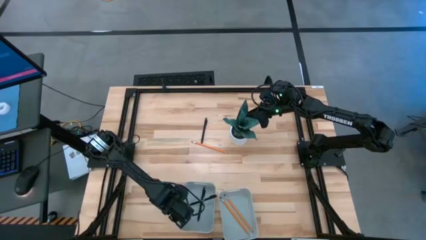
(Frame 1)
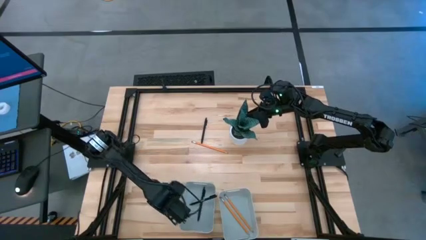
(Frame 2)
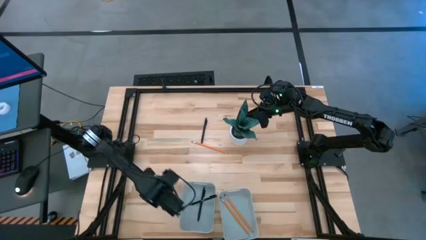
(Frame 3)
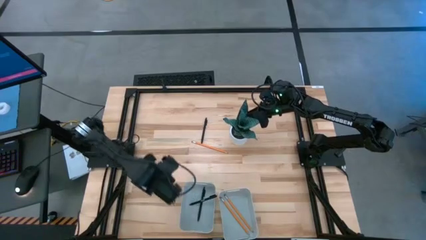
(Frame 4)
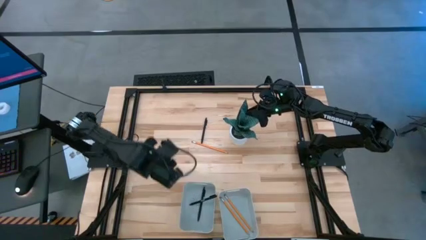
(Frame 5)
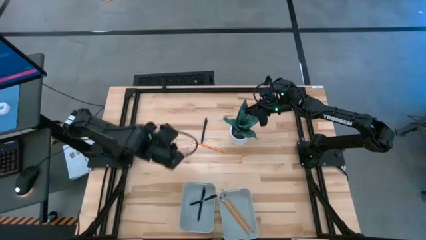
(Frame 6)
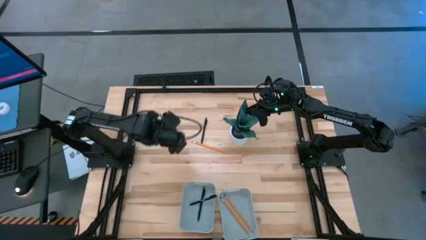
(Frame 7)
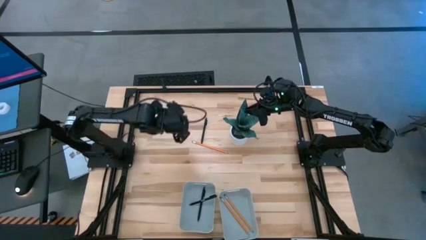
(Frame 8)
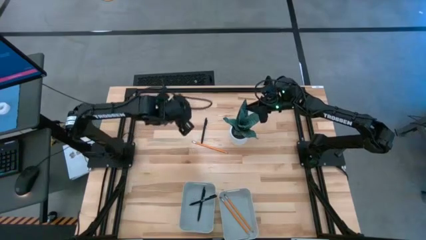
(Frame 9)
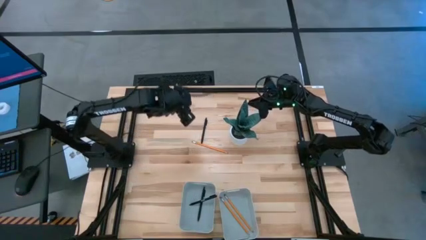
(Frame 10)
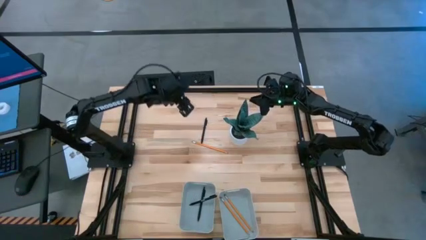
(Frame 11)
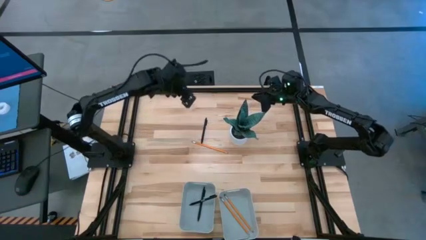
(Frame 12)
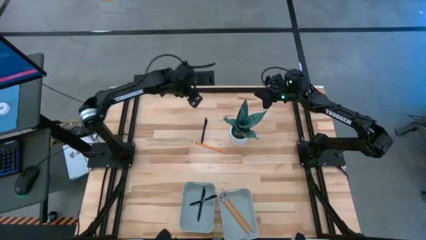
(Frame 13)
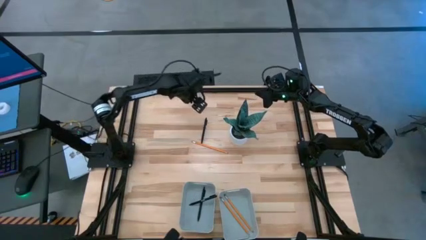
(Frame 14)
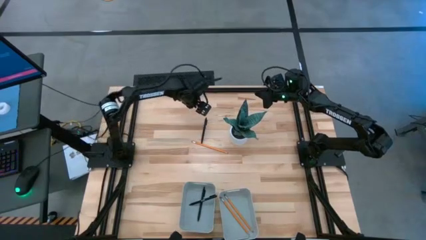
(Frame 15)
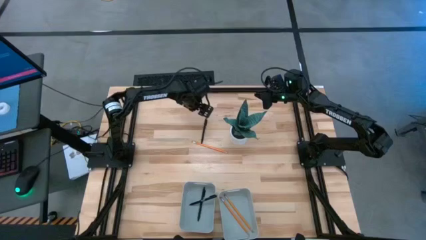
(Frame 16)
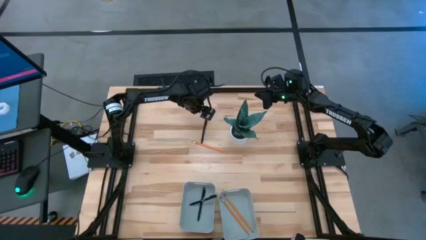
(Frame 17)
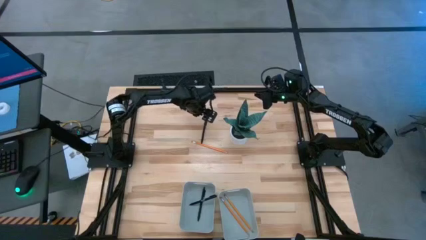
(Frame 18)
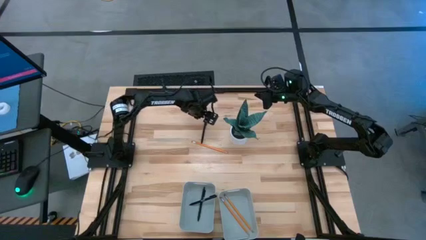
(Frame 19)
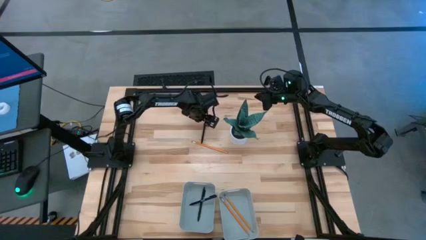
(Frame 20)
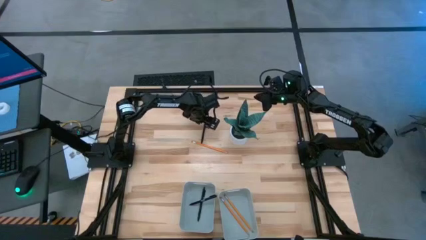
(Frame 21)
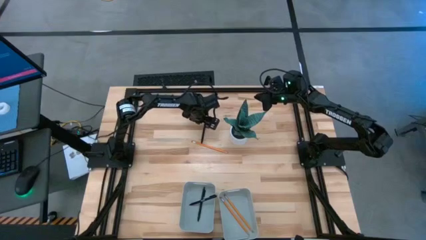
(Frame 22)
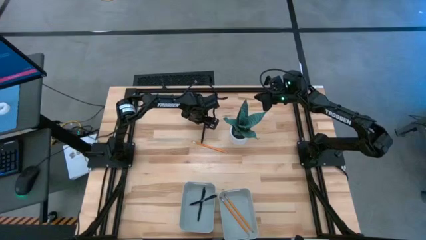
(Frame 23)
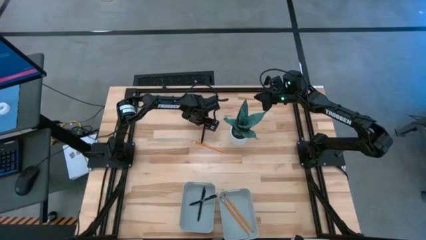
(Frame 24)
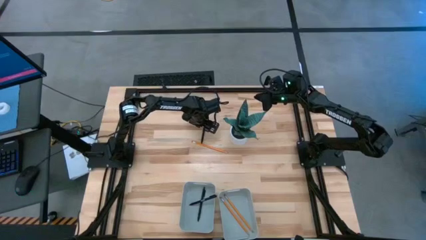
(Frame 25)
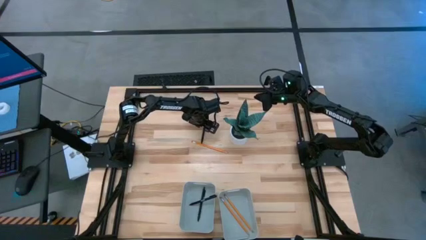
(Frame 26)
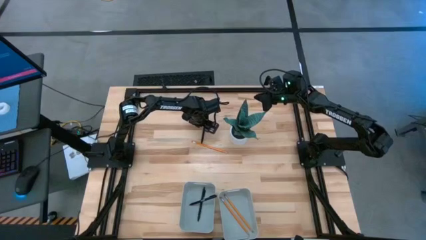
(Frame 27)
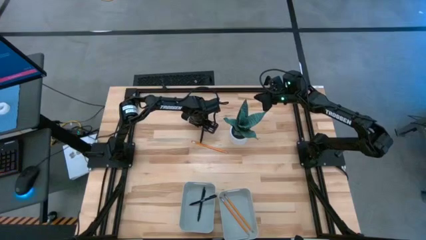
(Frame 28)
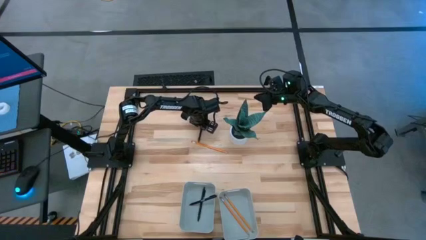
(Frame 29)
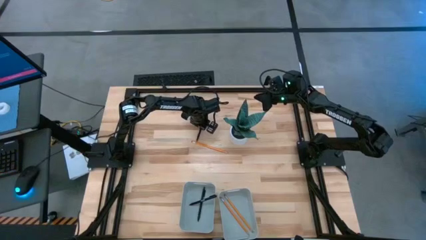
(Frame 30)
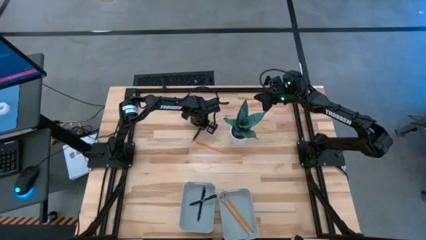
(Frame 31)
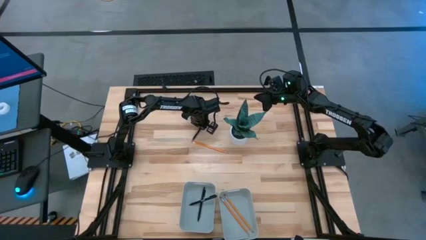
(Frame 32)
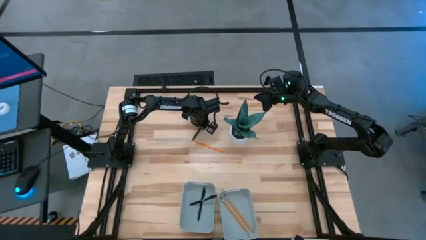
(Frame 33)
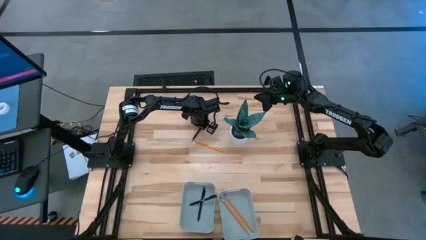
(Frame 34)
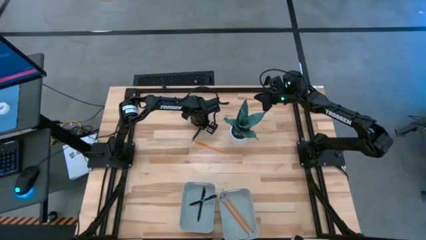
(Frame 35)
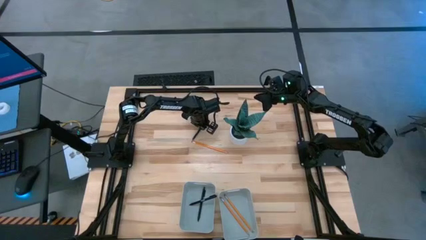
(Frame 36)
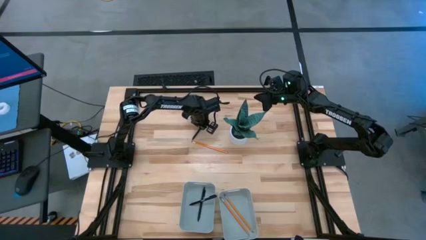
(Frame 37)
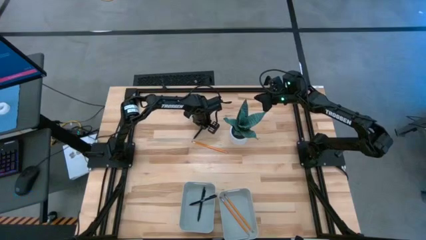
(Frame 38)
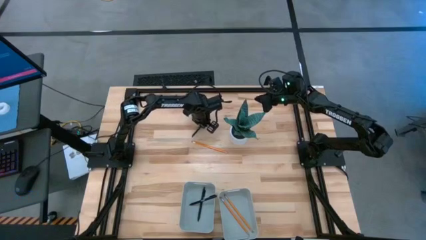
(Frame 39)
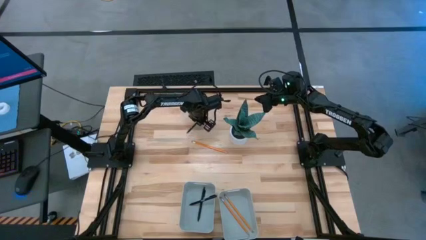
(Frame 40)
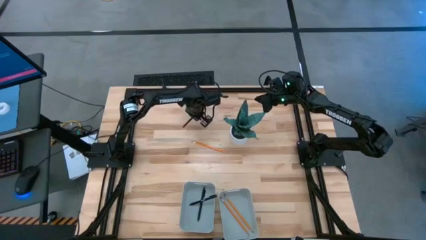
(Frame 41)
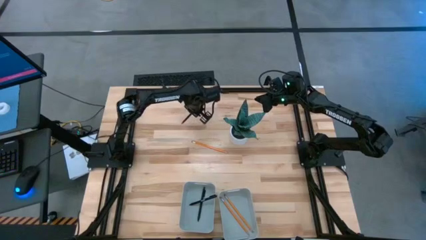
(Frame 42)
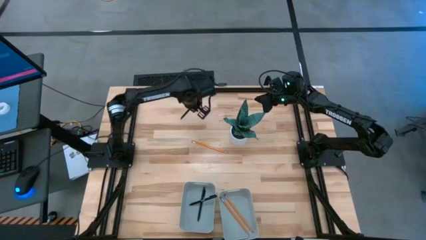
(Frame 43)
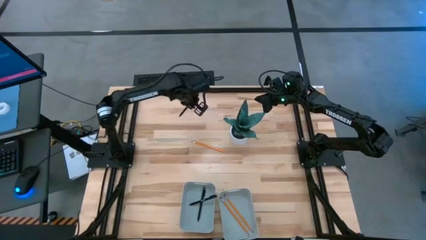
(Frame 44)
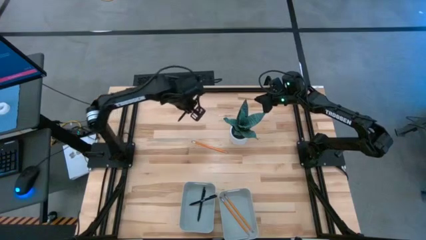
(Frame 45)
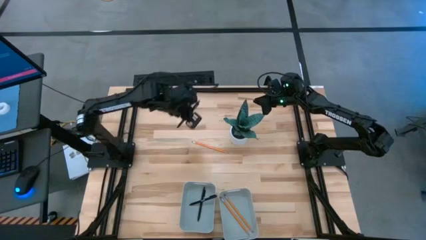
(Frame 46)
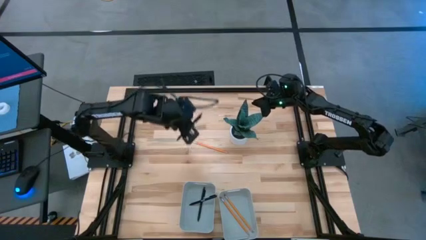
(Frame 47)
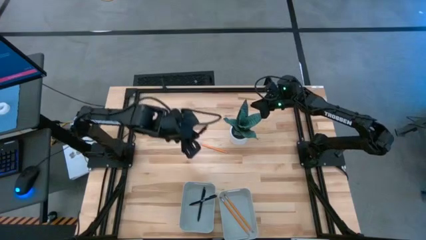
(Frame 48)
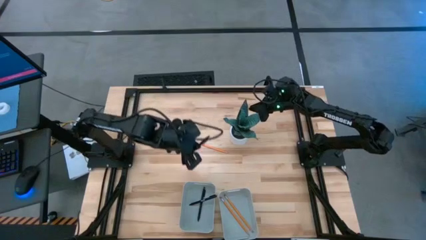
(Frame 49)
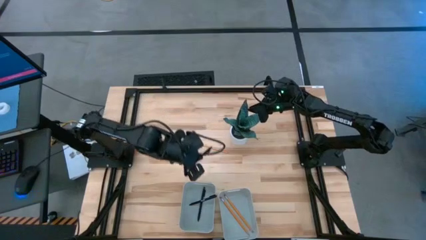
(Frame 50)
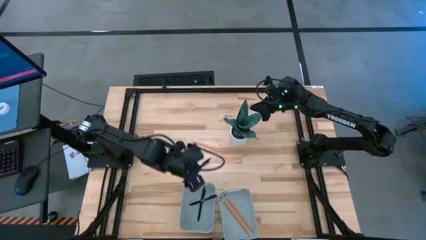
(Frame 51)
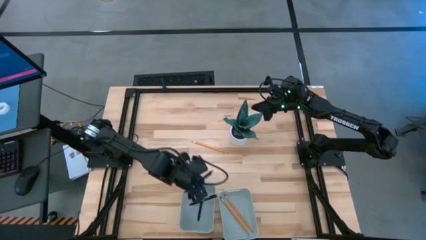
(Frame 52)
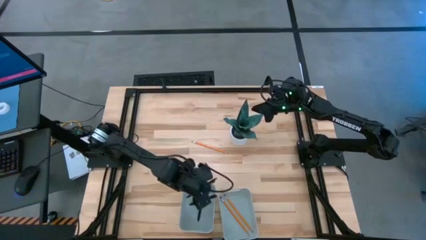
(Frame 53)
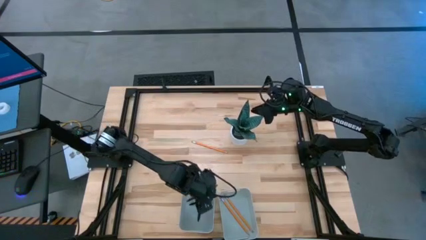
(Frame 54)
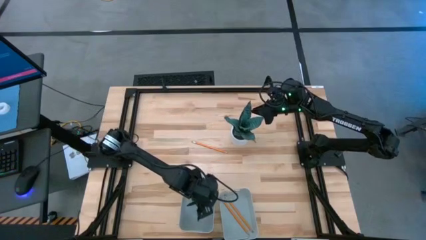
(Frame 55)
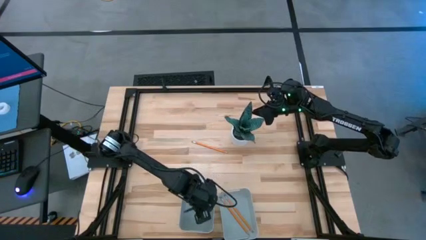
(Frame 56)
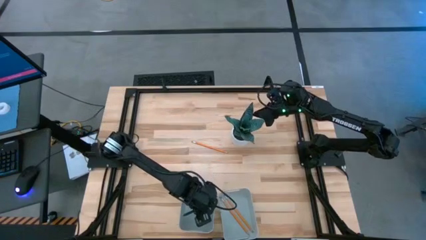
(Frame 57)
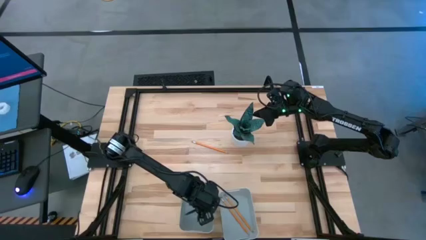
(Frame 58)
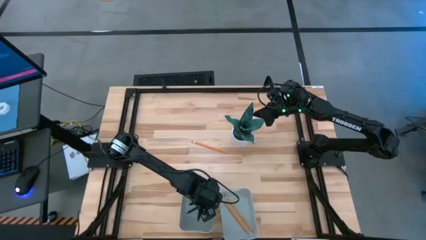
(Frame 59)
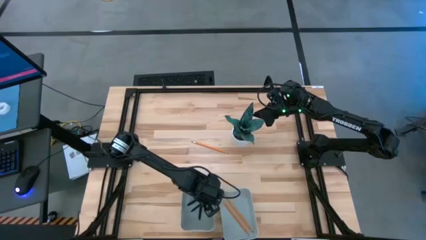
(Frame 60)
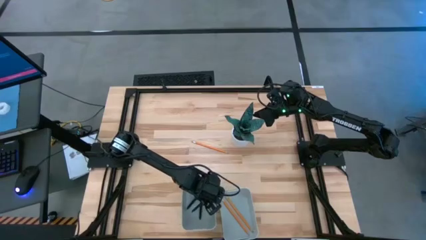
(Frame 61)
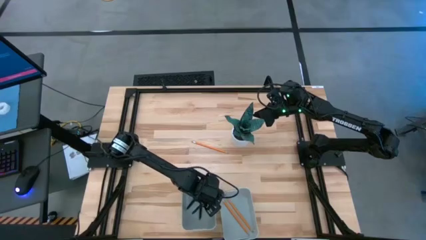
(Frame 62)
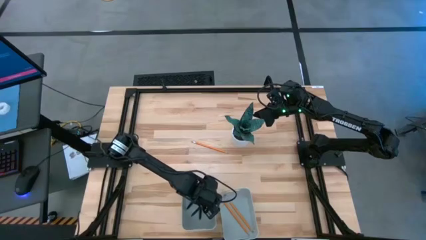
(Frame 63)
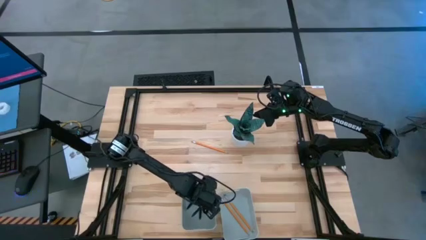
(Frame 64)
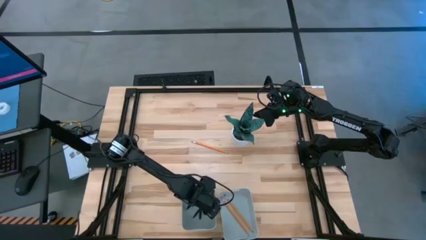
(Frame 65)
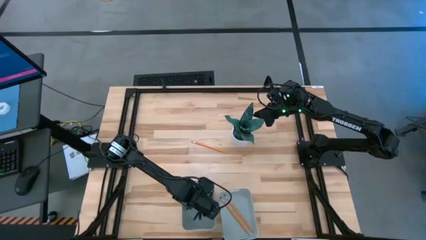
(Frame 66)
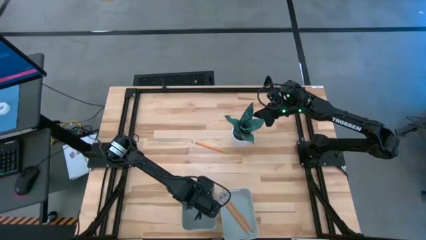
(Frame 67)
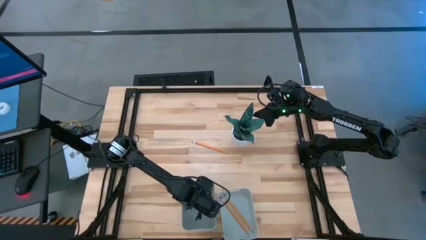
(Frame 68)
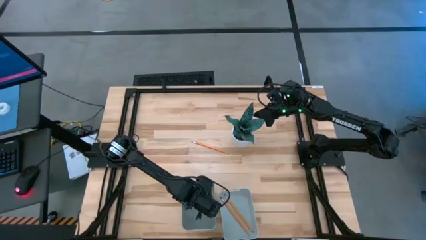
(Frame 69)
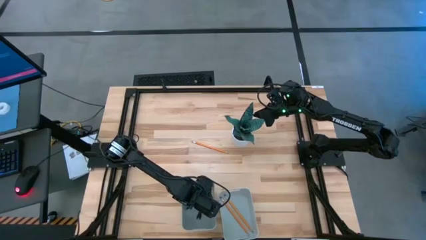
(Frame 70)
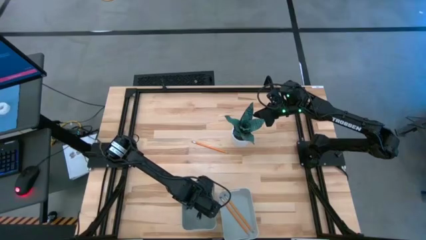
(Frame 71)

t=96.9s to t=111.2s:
Task: Sort pens & pencils
Put the pen into the left gray bin

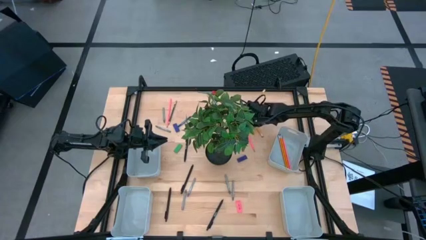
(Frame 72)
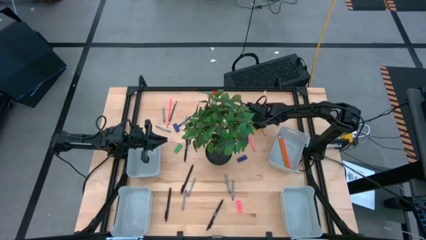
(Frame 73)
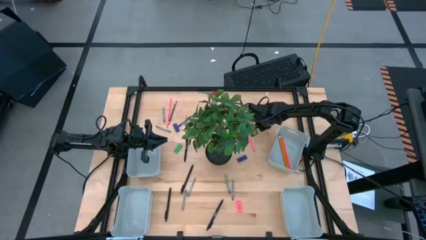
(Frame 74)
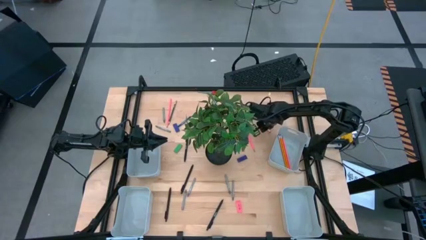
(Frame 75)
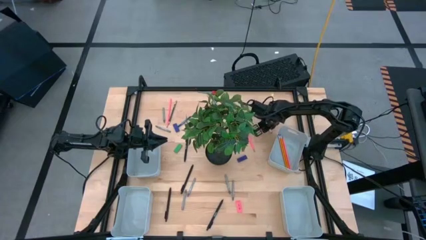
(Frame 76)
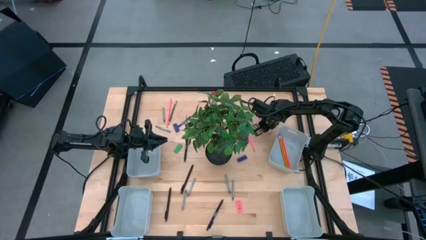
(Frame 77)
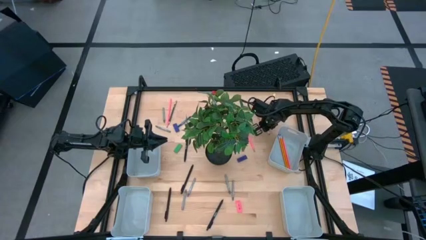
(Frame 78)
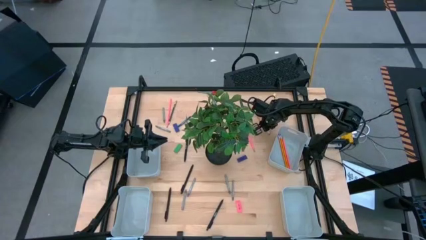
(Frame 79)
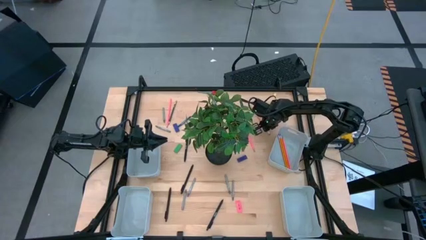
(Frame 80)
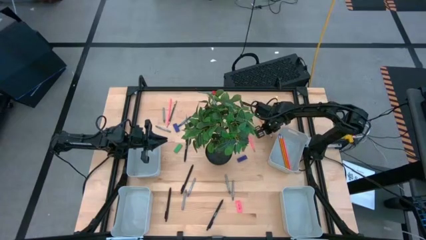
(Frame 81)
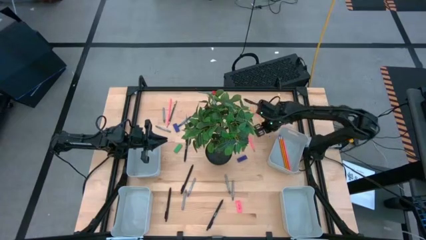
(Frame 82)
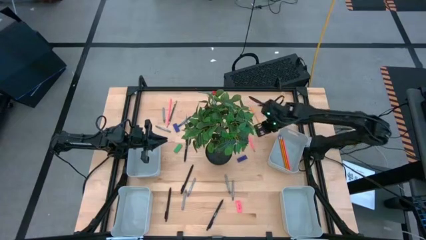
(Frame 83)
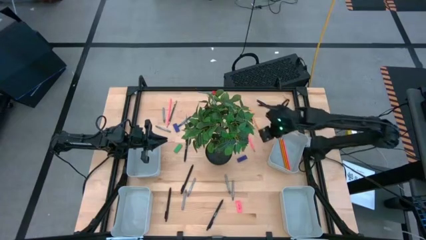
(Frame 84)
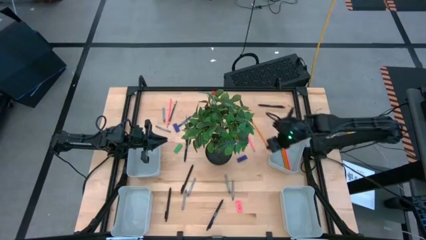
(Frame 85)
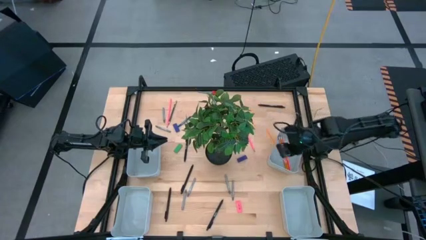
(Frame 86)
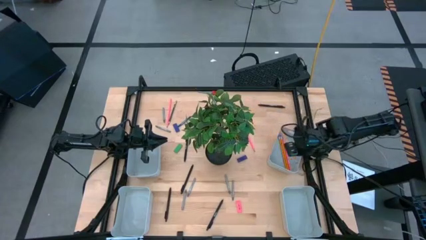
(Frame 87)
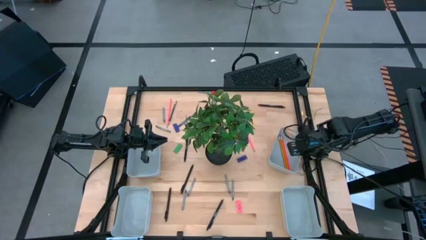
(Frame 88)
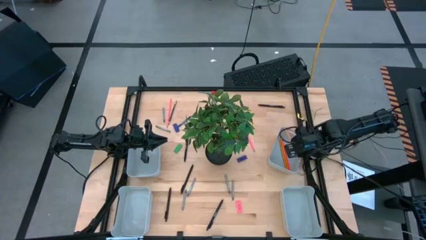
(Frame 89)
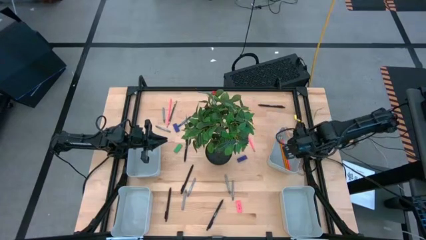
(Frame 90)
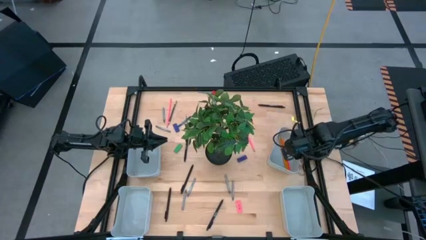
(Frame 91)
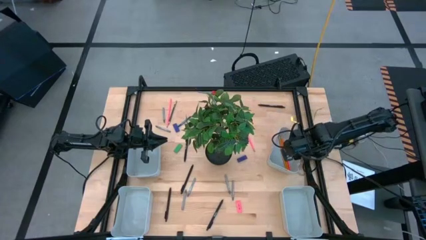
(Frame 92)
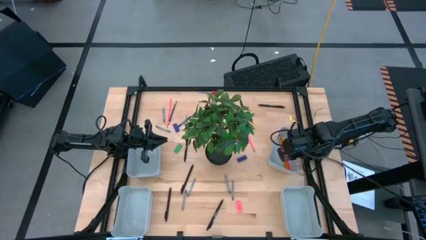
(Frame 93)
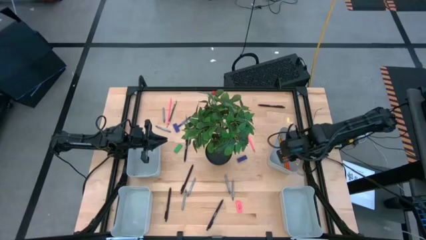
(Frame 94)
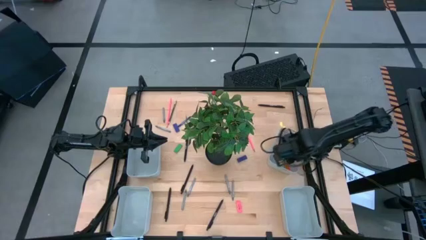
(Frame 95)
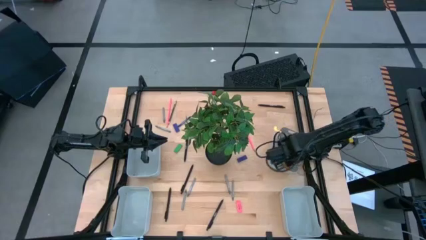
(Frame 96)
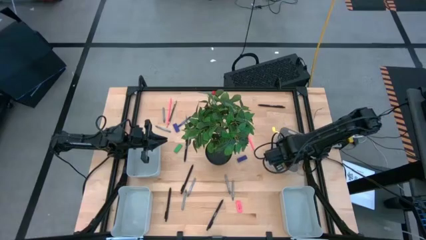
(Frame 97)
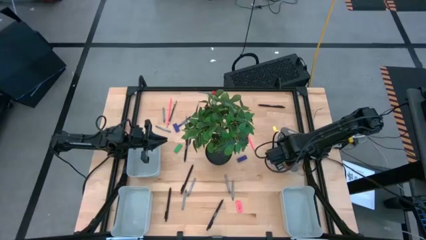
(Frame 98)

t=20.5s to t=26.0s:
Task: Sort crayons/erasers/pens/pencils in bins
Put the orange pencil into the top right gray bin
